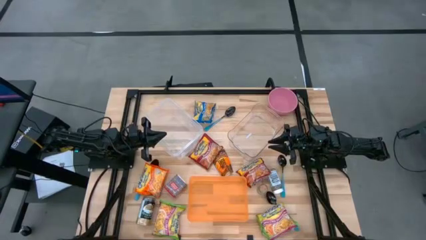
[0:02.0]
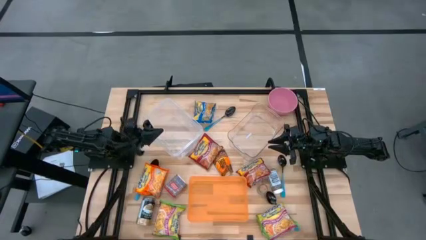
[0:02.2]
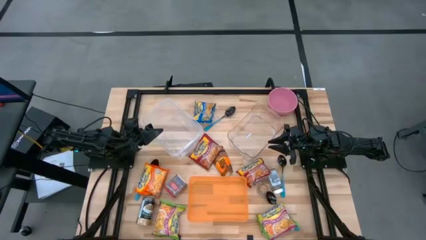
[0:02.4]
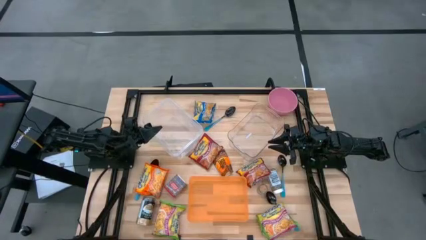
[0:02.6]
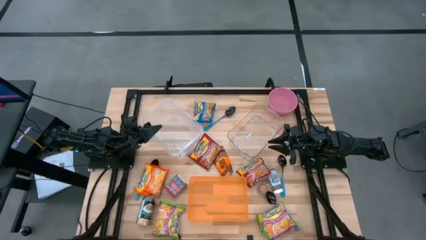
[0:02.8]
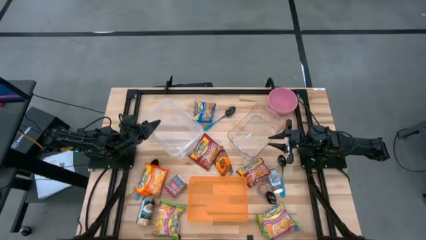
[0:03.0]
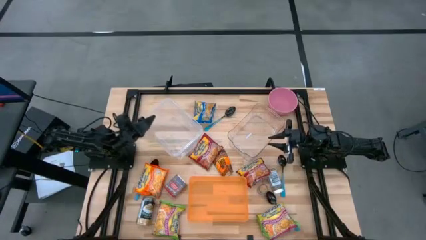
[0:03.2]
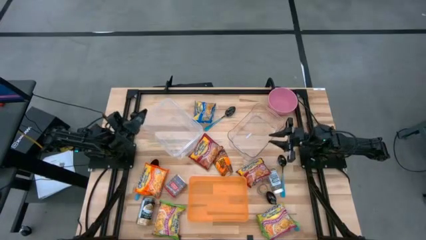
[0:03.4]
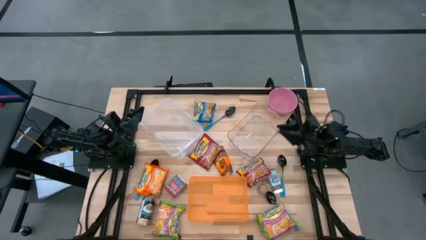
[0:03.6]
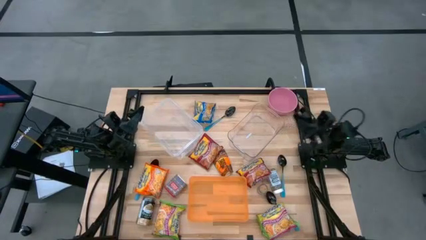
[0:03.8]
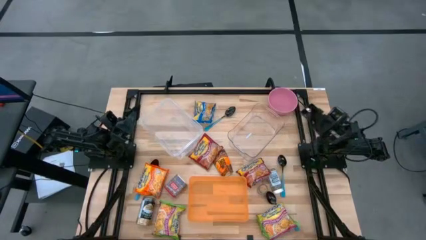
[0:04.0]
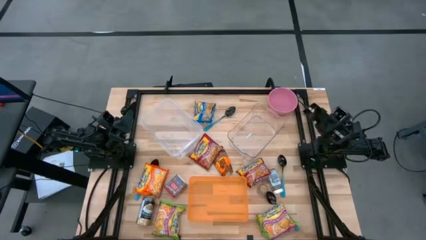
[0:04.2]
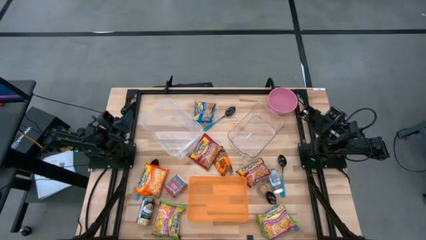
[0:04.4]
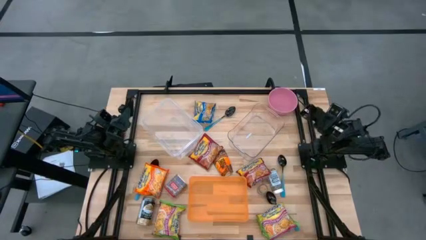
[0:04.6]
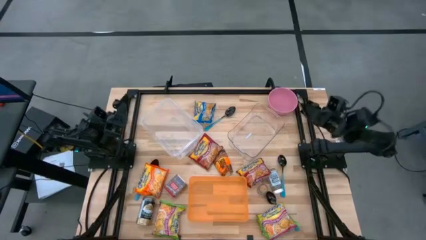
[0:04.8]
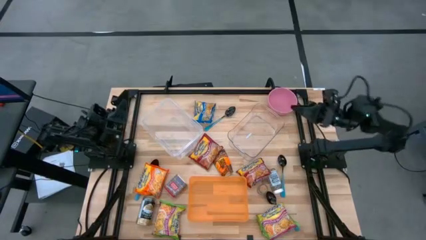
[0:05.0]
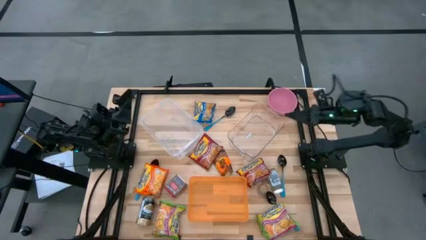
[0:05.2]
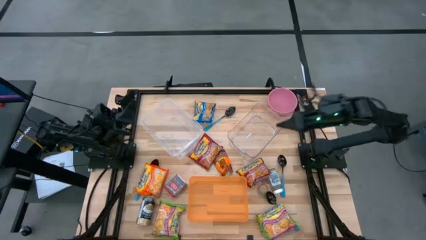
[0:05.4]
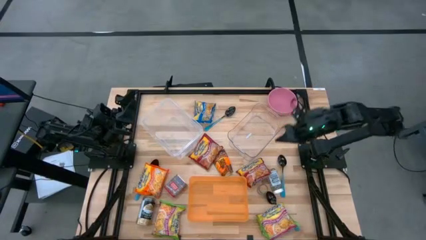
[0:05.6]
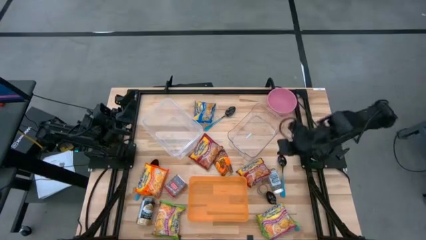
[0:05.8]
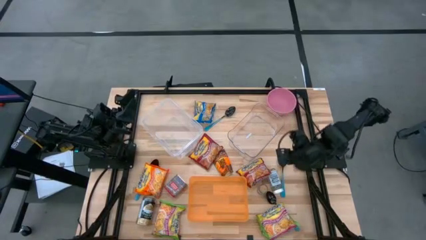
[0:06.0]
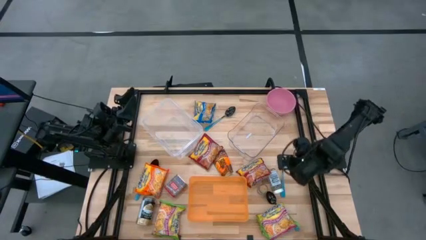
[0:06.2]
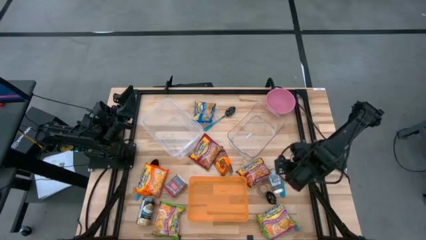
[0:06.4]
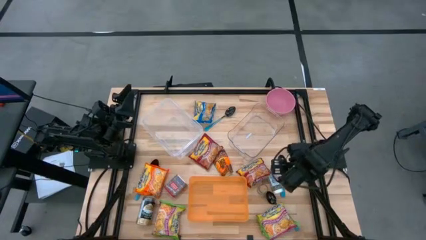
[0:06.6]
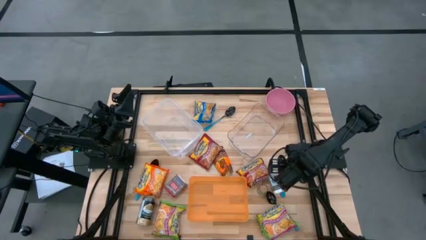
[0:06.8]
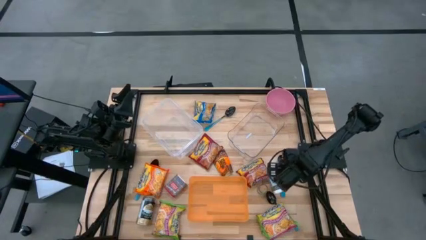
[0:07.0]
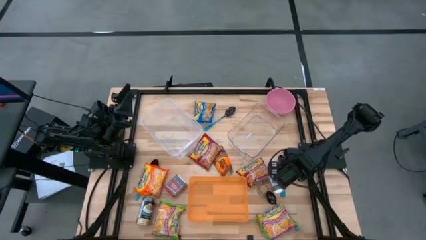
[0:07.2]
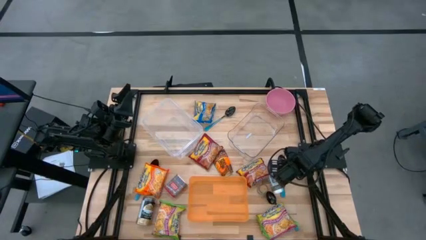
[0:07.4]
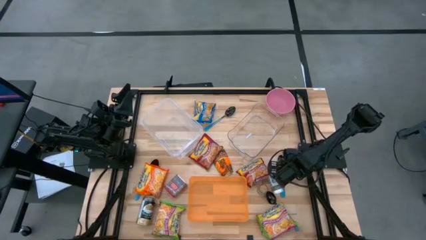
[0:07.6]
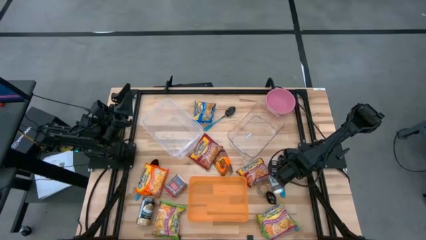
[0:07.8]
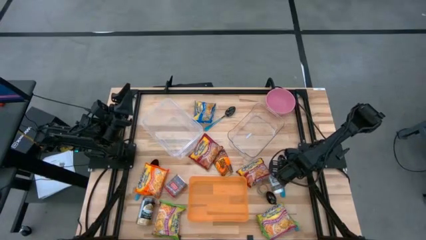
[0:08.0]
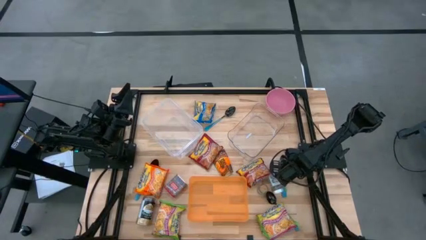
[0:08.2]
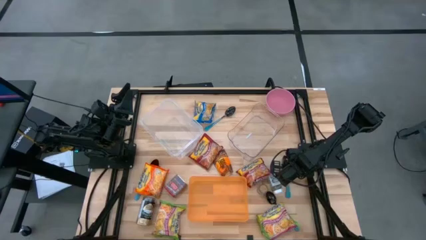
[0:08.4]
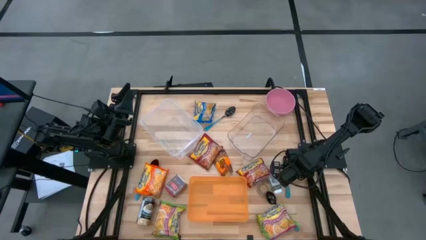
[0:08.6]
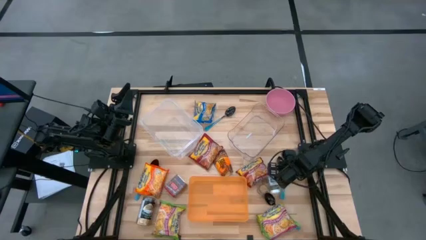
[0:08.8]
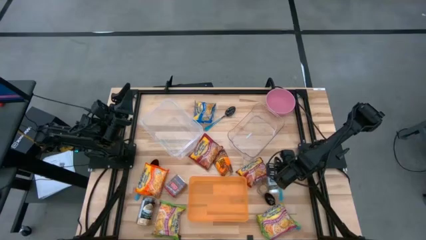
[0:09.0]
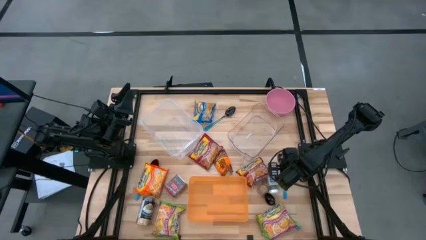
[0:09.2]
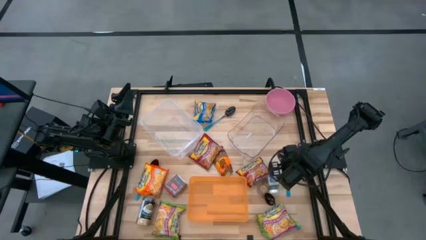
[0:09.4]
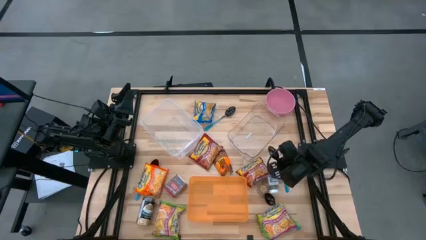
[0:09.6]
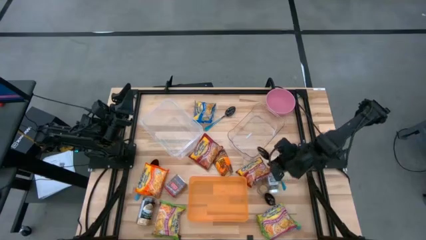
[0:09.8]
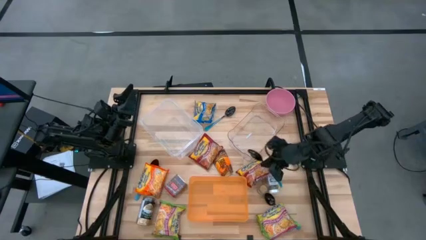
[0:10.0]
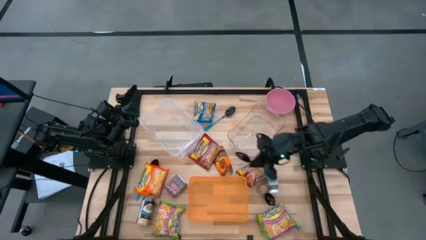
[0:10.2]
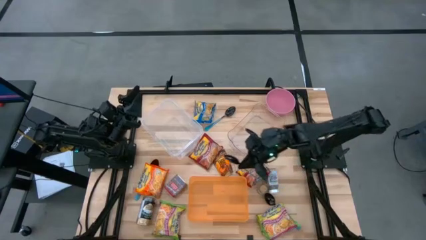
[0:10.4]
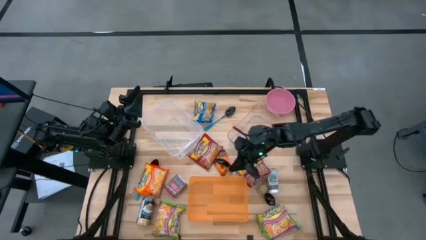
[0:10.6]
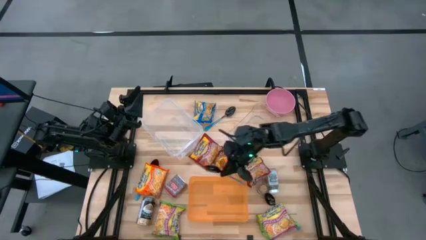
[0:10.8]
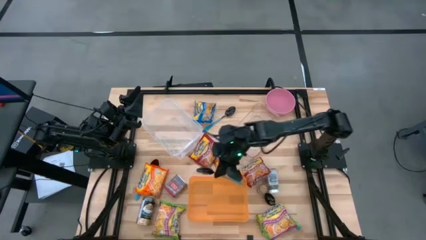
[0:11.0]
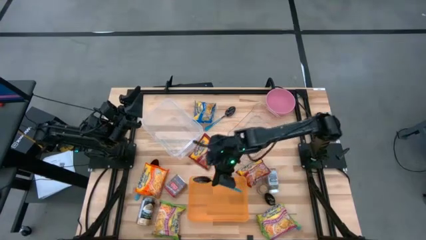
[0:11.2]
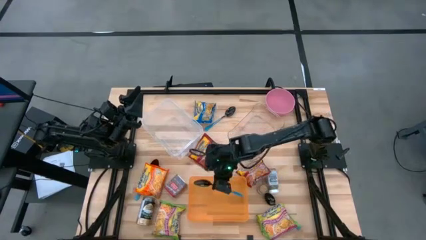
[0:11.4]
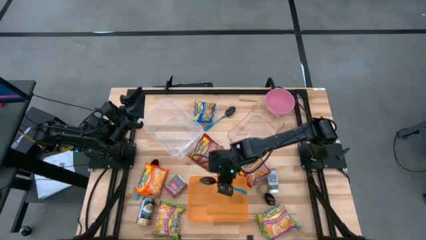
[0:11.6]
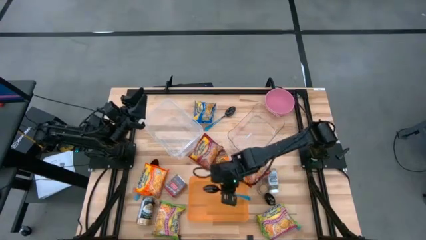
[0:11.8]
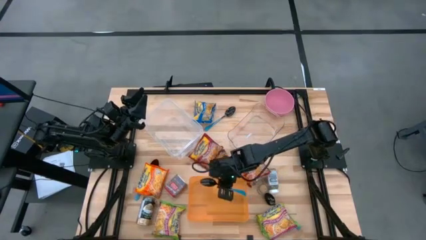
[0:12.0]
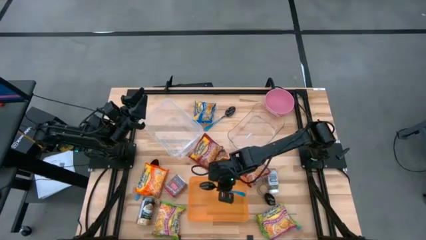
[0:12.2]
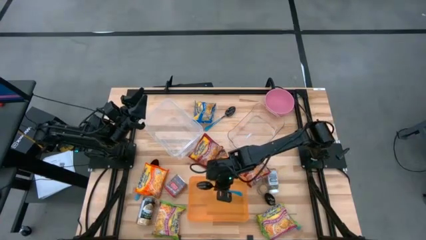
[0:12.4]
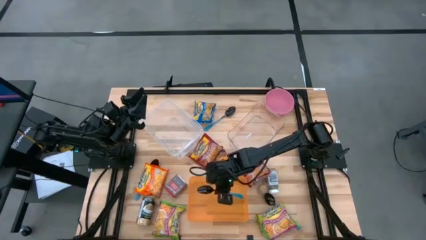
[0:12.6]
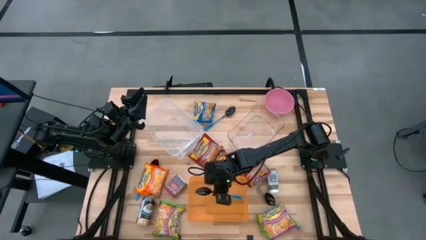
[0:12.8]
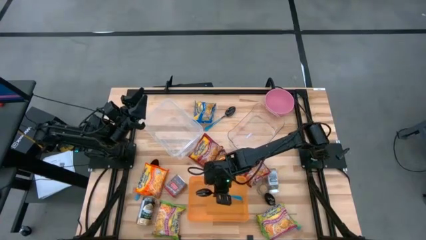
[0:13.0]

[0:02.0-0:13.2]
Task: Pick & Place Food Item
Put the black spoon into the orange bin
